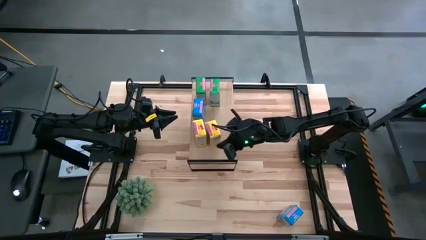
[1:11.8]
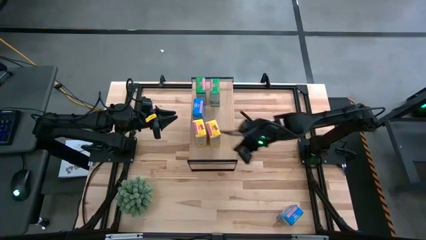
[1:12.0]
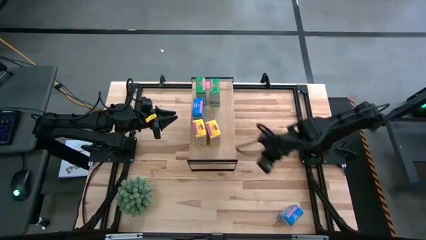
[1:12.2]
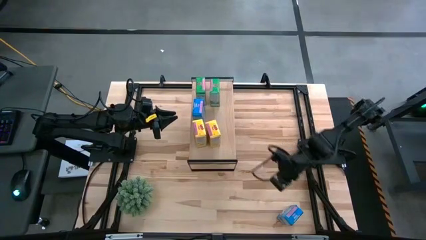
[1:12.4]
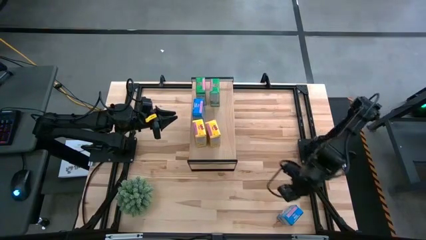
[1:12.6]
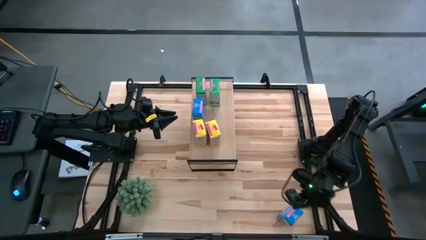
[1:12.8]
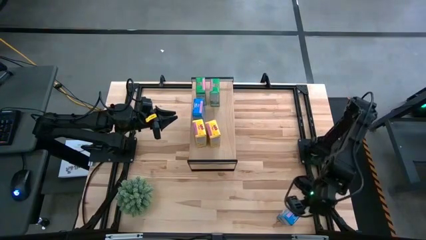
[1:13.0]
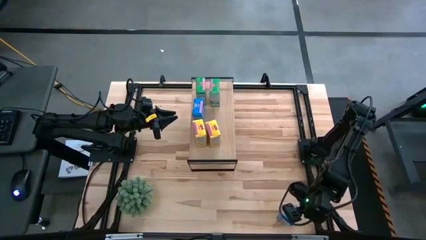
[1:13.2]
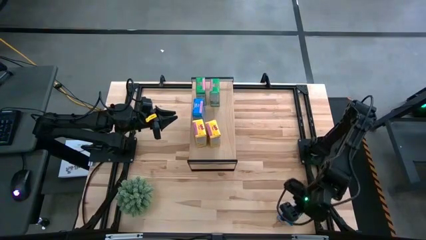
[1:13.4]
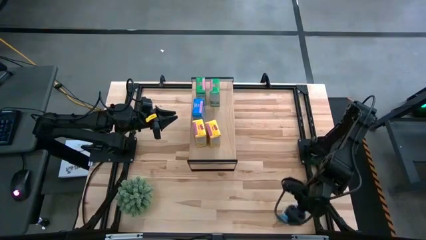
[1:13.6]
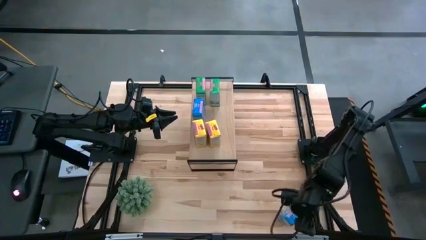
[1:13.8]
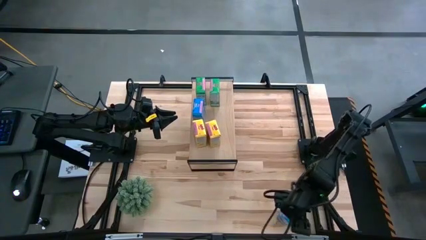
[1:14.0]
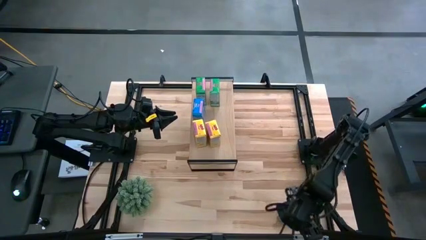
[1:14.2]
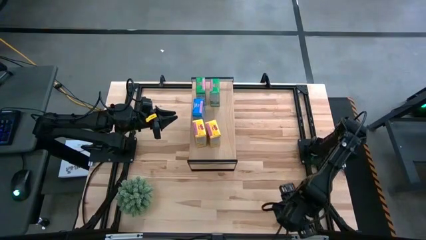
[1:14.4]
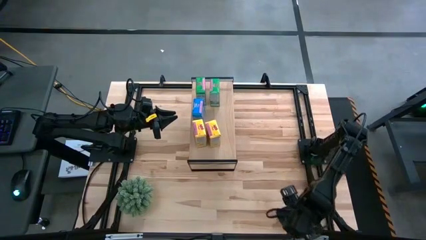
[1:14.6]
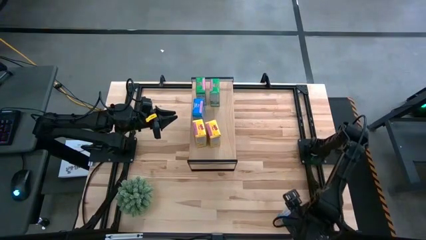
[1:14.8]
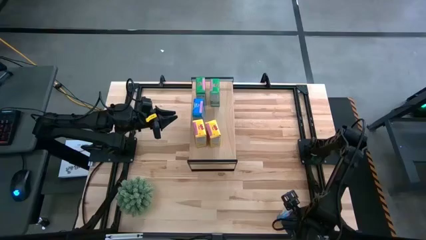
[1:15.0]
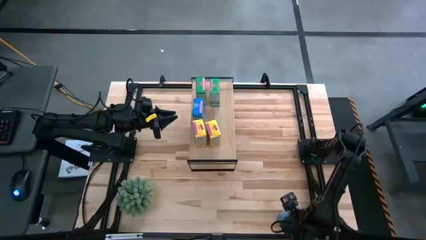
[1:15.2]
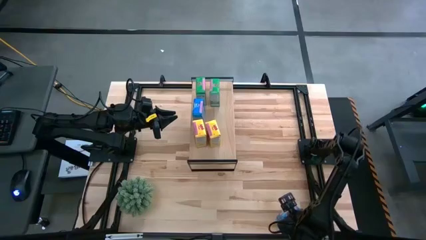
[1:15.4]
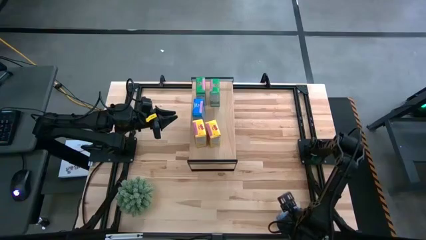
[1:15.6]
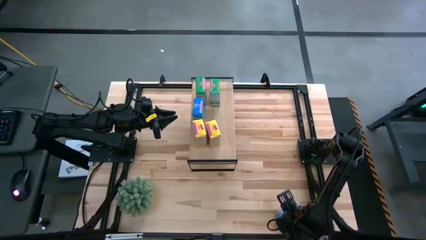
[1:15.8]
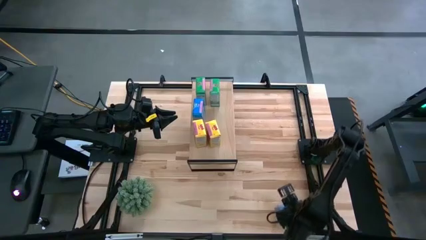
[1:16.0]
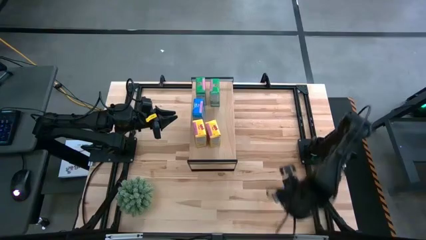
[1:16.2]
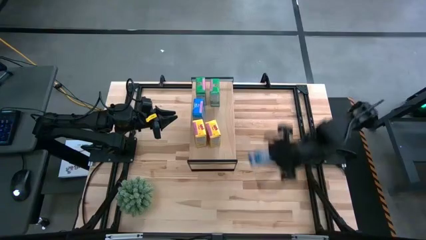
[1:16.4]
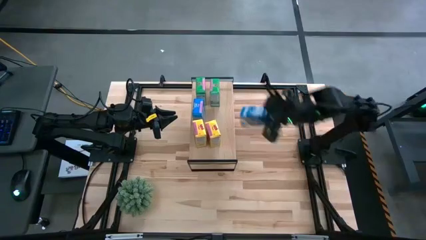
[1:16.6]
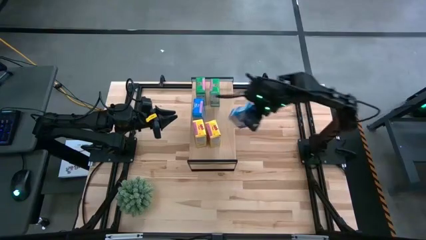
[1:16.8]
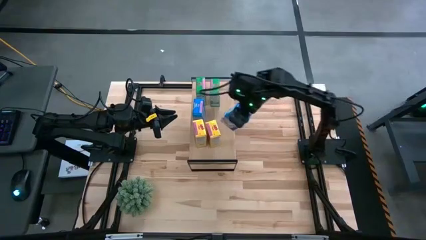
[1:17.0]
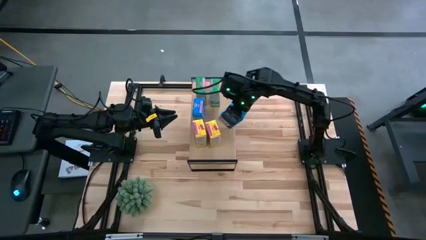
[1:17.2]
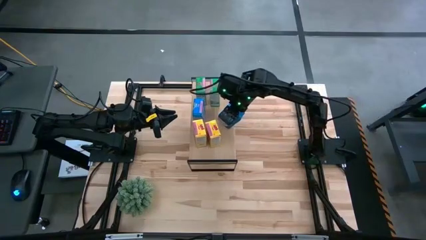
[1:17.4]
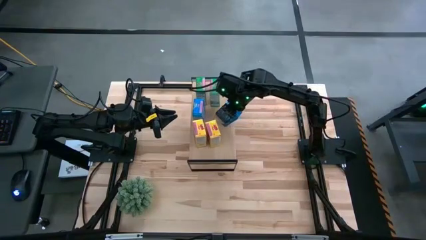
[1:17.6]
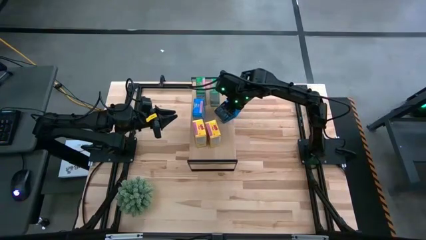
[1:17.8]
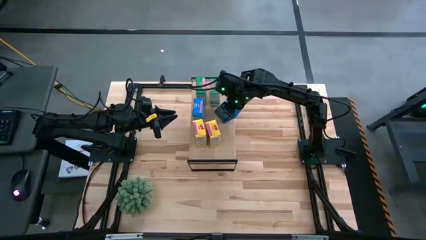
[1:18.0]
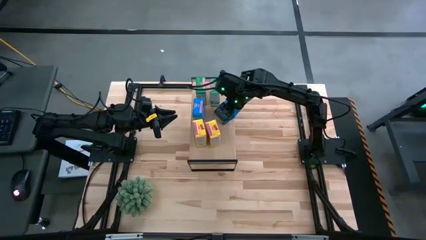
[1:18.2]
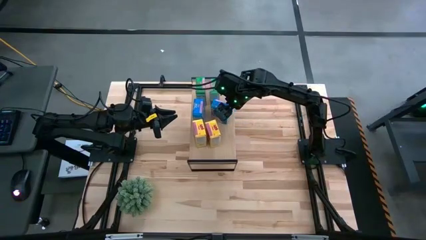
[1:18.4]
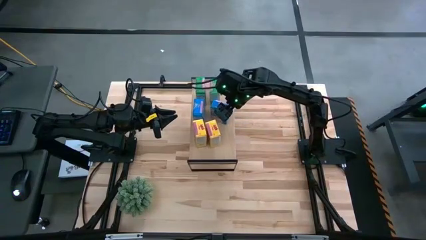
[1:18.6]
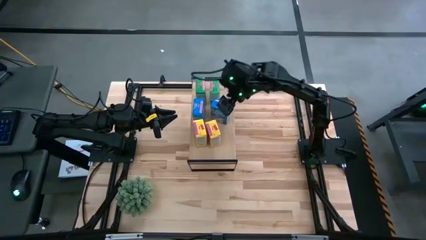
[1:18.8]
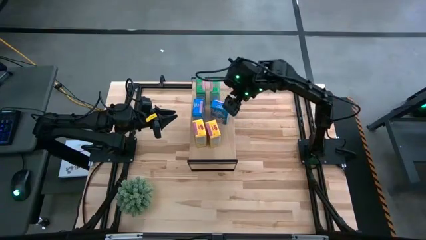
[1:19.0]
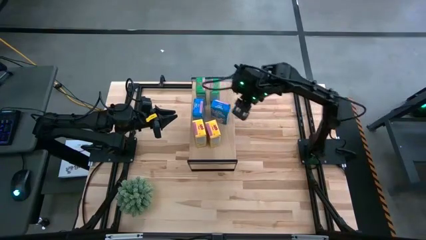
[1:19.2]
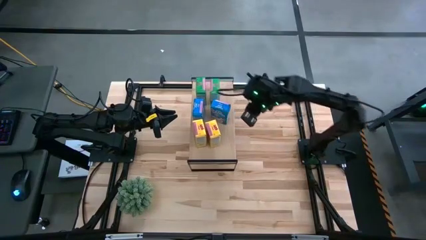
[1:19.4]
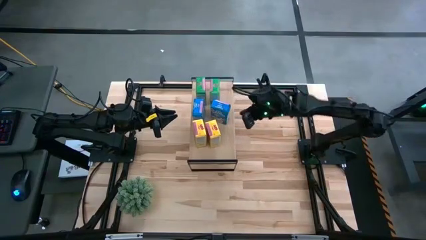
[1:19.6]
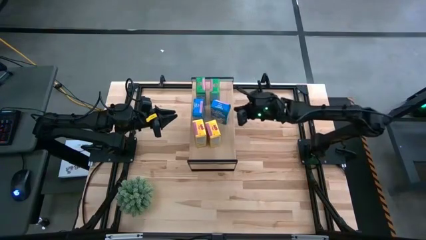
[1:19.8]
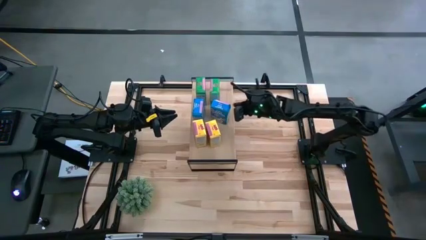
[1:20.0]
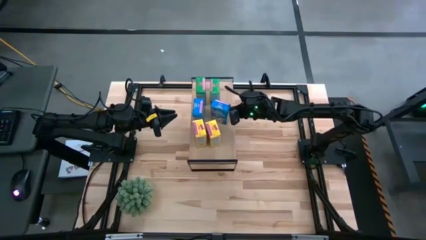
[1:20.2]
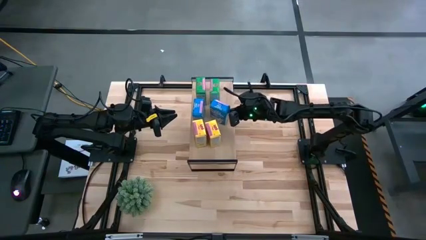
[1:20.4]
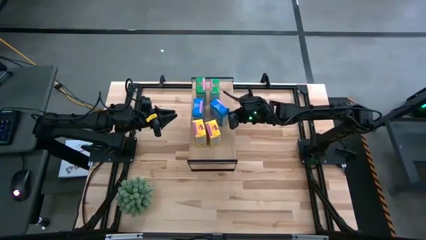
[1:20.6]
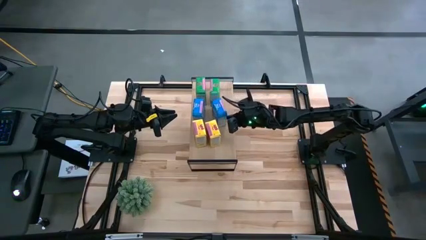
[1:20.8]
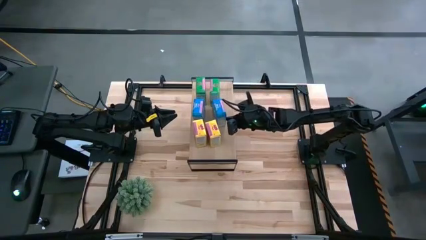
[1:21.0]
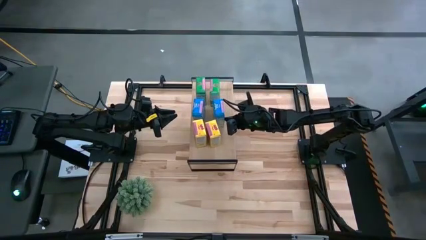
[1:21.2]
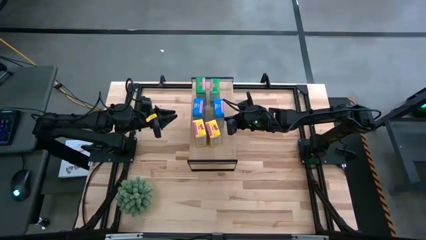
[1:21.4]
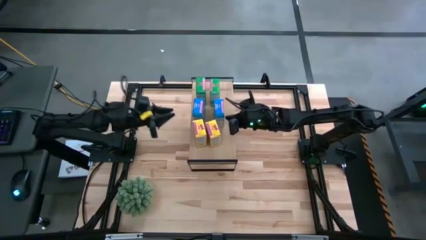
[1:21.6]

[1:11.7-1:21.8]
Task: Stack cereal on shelf
Put the blue cereal on the shelf

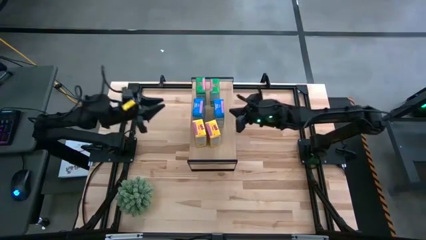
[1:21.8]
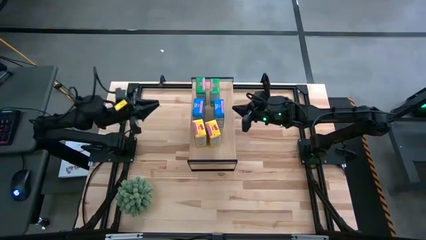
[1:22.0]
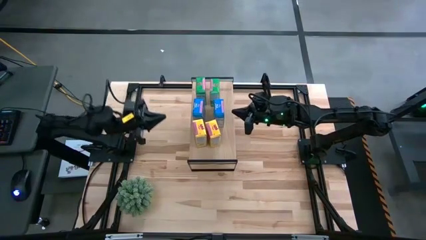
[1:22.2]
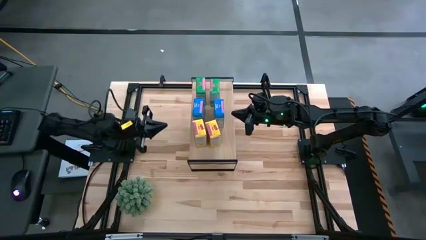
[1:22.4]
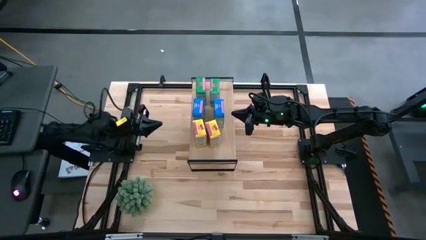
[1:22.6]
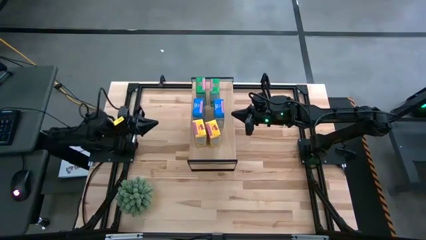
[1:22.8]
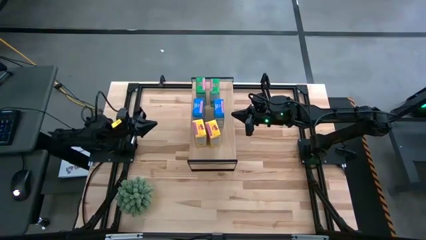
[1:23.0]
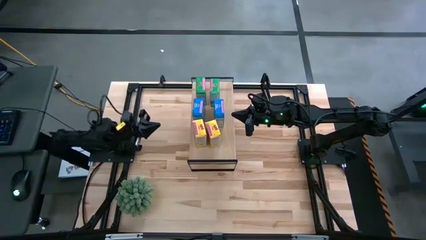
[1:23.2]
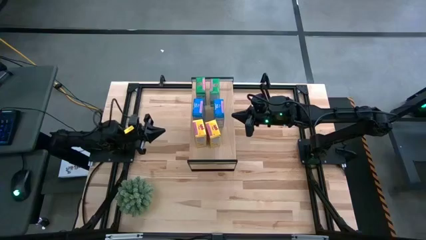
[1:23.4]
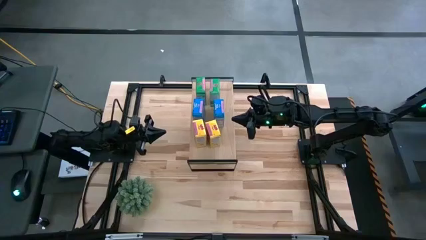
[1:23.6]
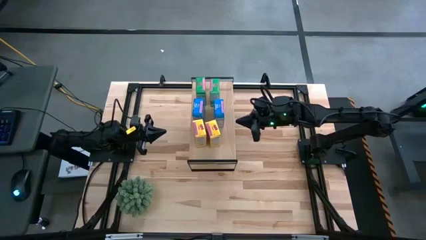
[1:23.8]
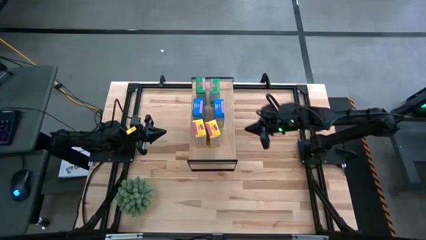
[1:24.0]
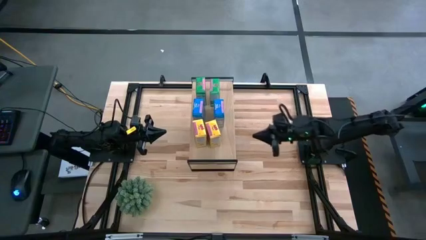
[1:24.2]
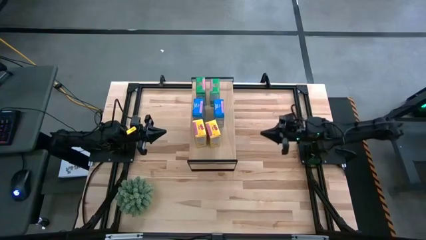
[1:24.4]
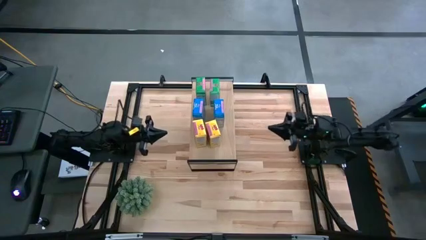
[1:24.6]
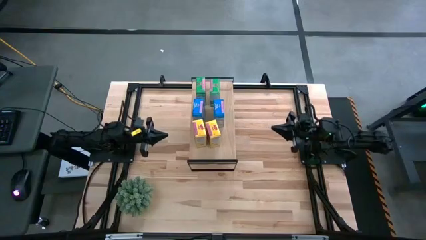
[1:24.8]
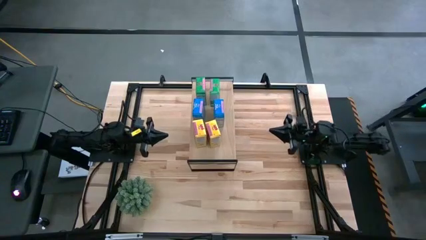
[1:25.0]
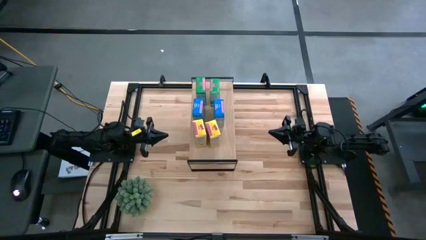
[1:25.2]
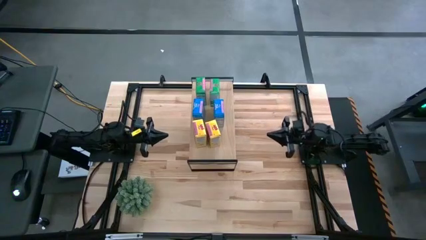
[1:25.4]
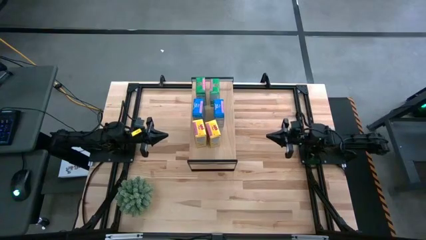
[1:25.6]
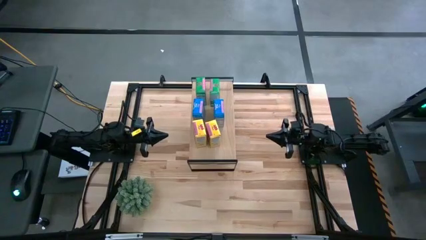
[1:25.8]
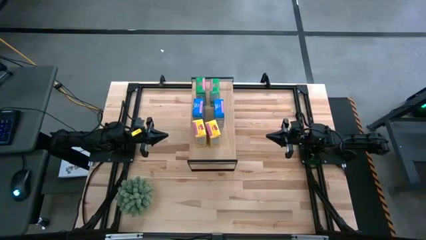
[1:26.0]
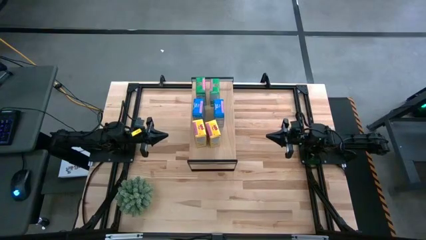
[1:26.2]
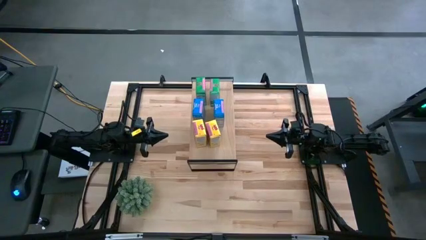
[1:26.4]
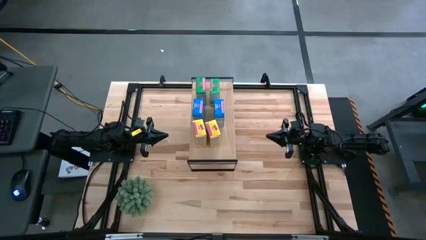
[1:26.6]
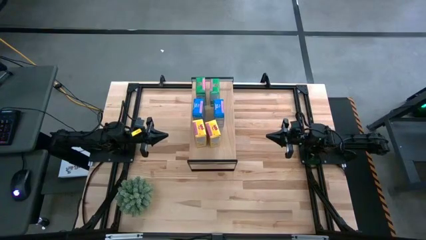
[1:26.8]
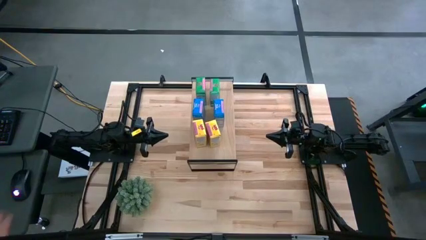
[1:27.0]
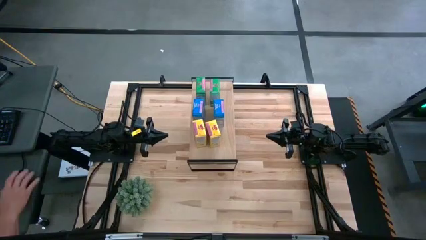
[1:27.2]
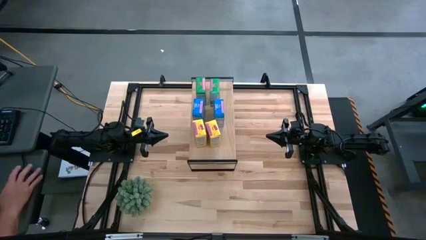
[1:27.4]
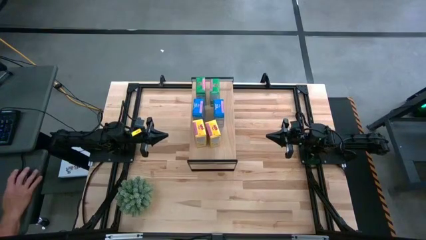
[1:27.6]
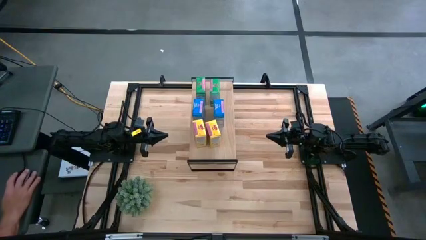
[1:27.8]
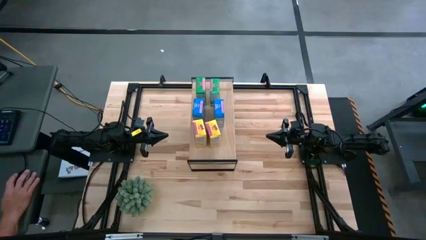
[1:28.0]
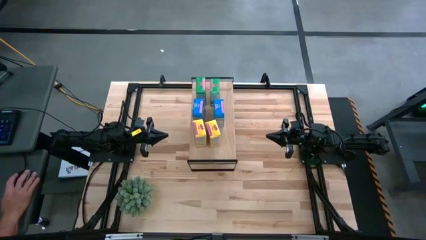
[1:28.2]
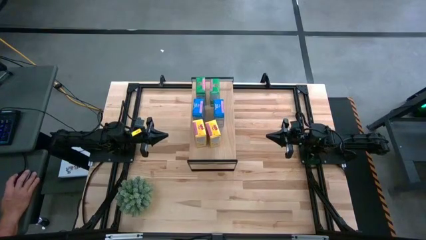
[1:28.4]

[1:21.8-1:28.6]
Return to Home Position
